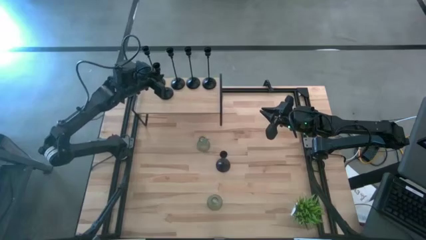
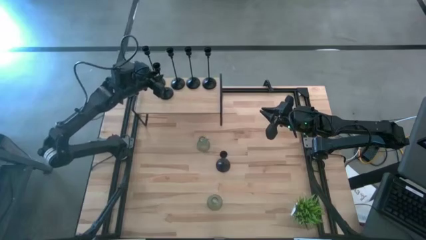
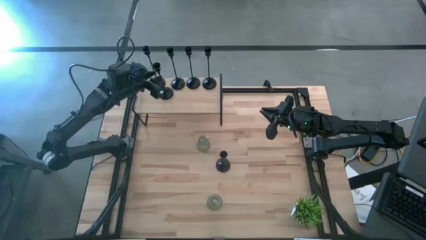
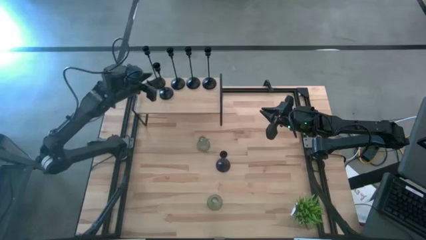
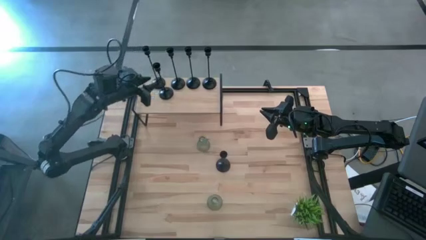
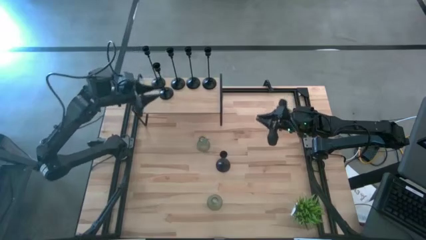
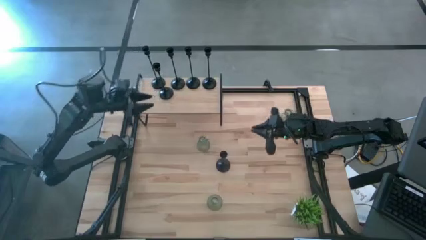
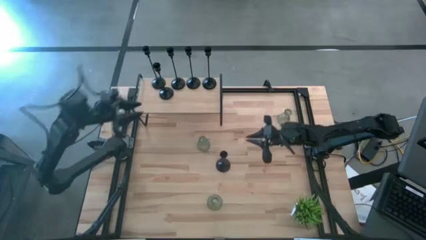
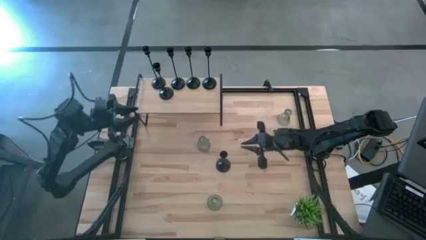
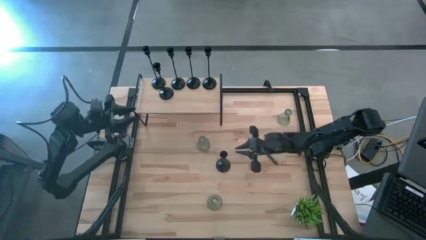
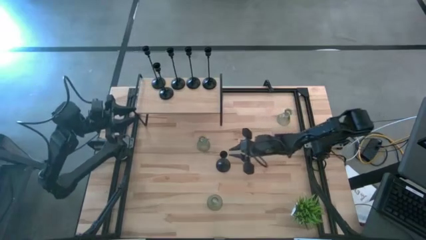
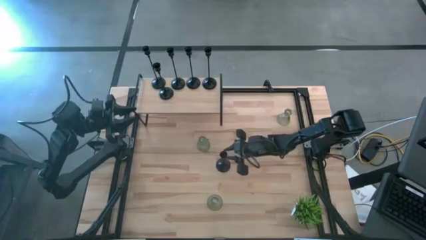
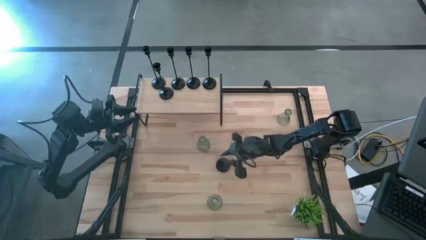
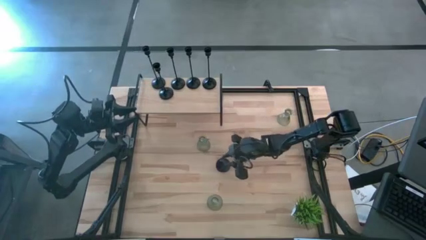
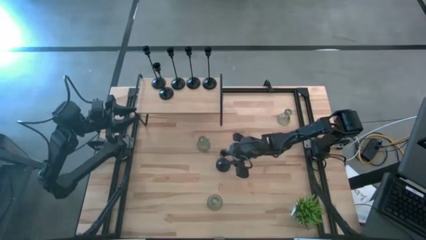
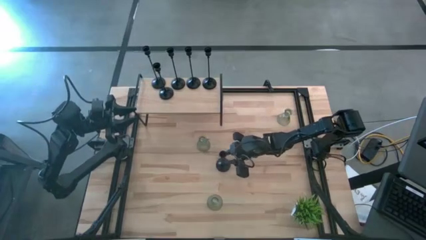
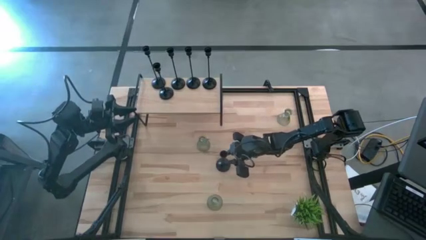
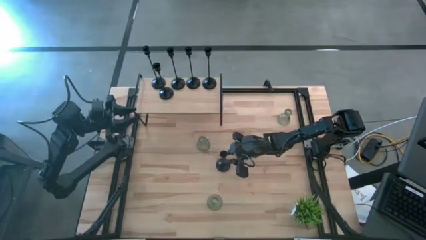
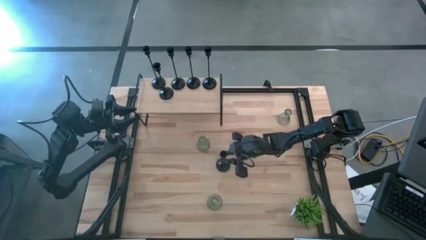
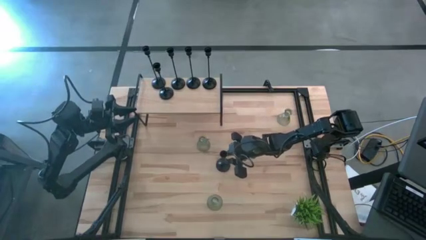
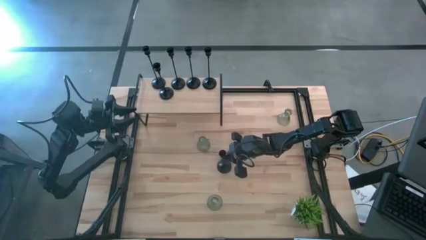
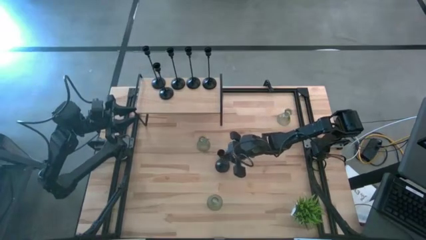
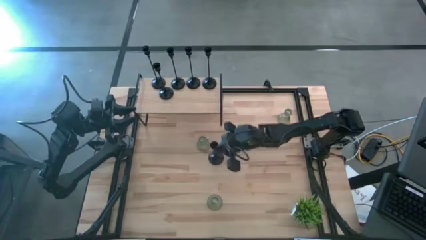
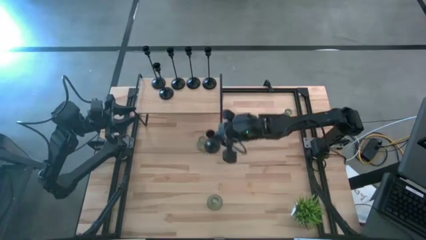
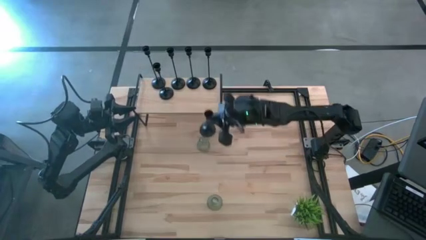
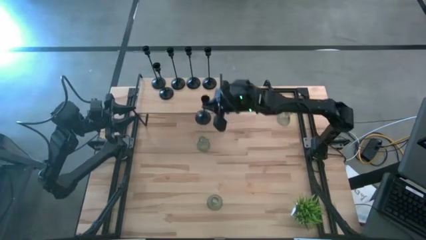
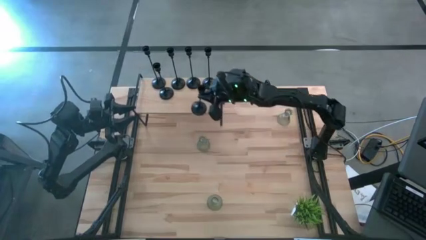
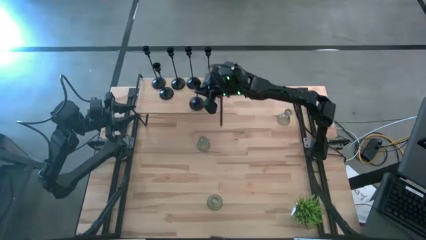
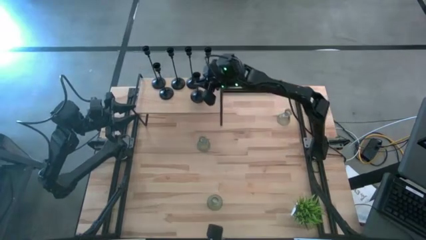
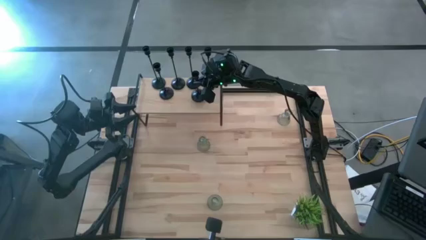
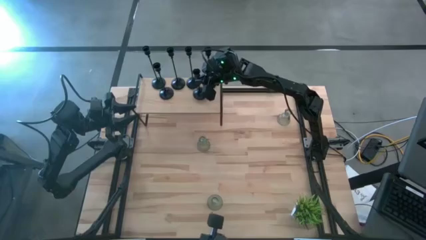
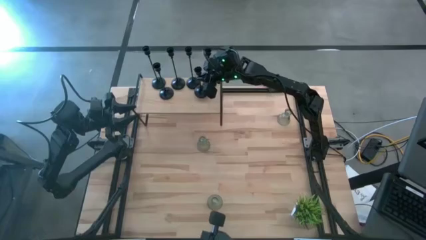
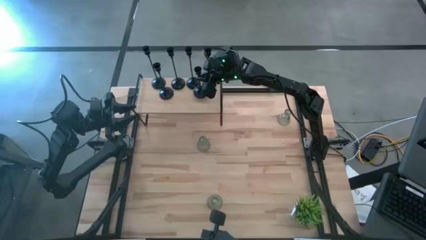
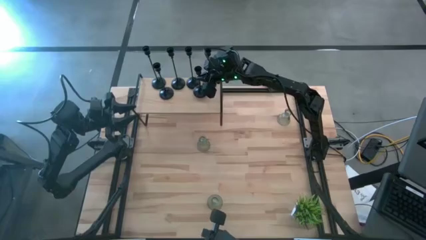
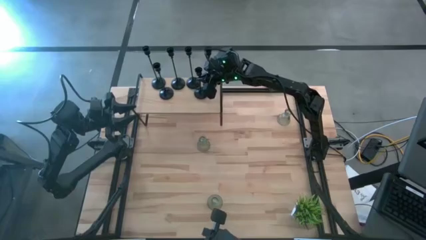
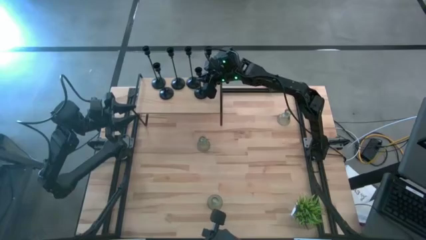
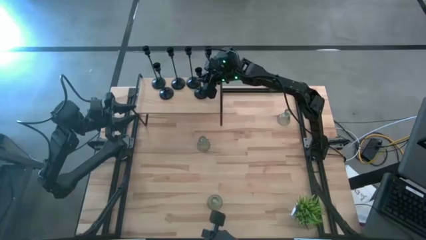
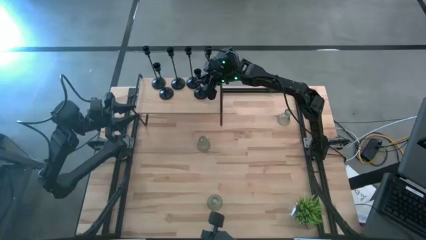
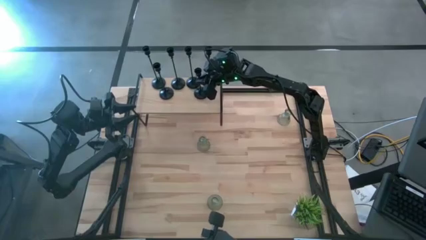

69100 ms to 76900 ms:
Task: Pick & Place candle stick holders
Put the black candleholder on the shelf
